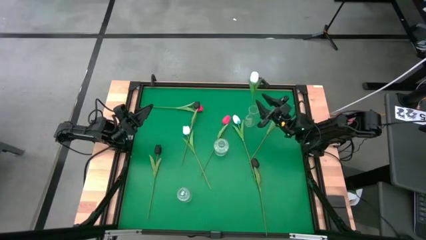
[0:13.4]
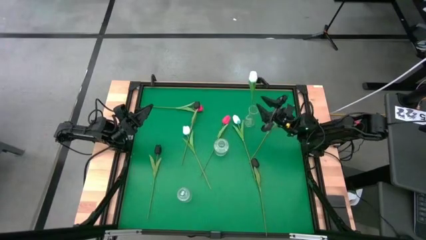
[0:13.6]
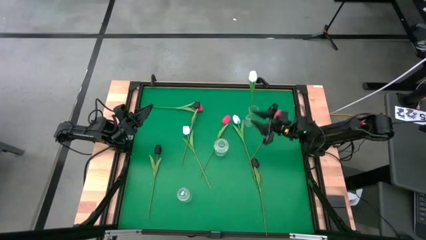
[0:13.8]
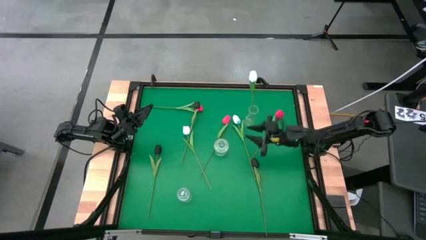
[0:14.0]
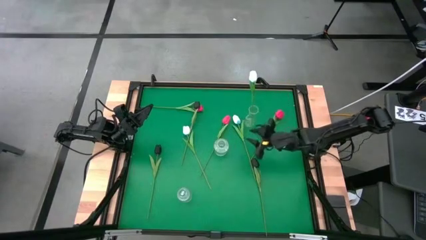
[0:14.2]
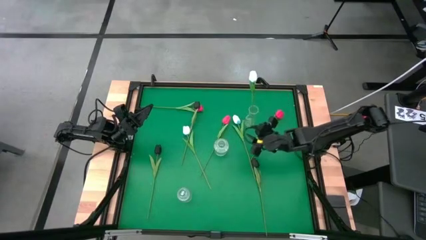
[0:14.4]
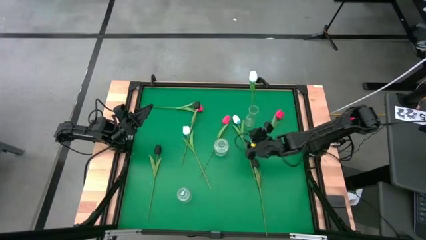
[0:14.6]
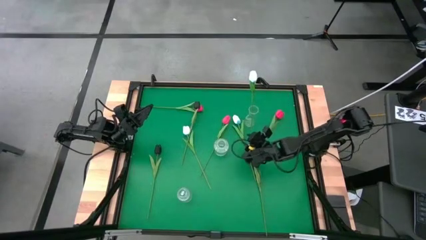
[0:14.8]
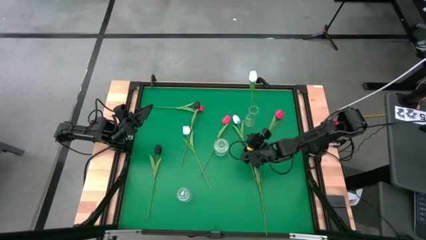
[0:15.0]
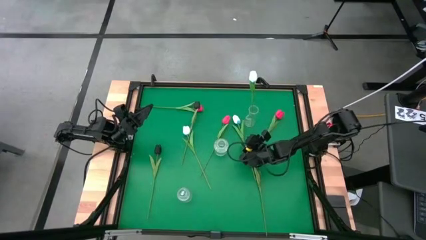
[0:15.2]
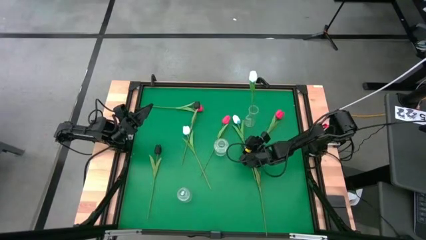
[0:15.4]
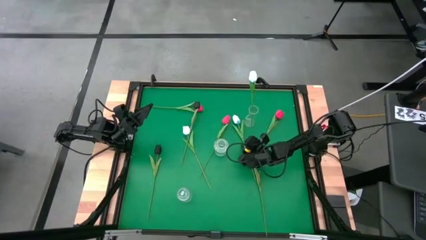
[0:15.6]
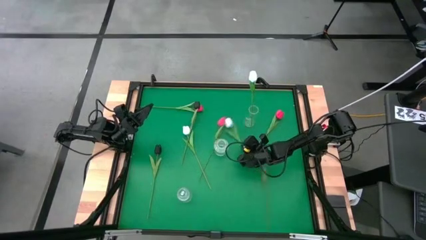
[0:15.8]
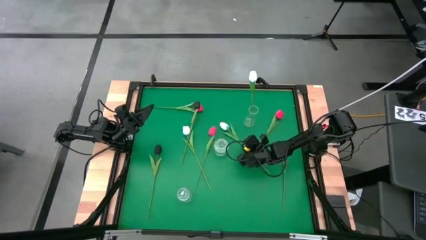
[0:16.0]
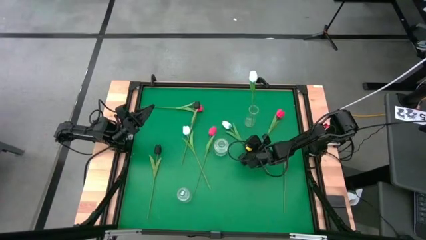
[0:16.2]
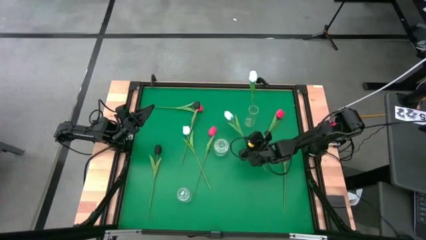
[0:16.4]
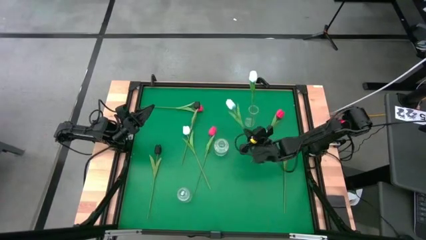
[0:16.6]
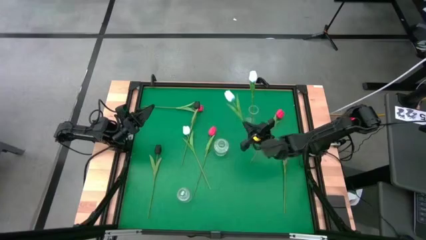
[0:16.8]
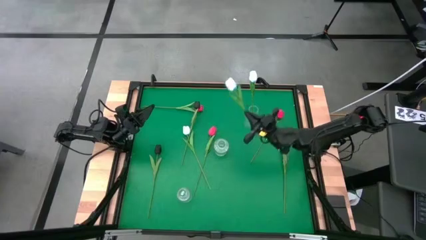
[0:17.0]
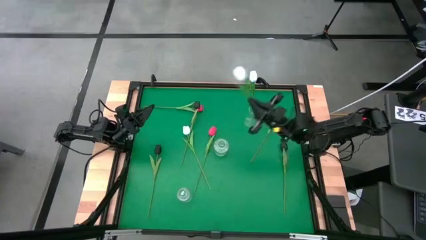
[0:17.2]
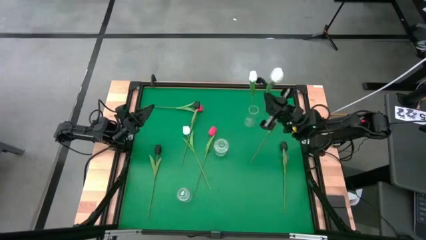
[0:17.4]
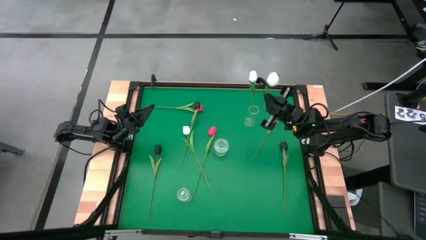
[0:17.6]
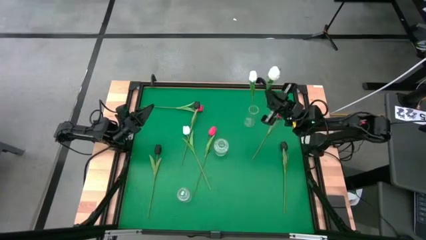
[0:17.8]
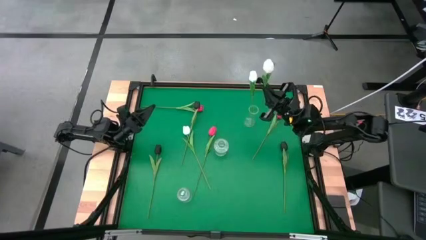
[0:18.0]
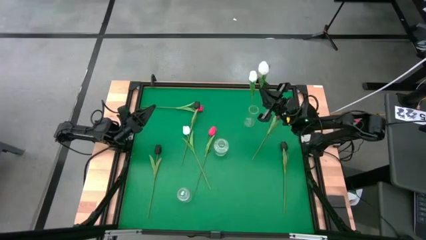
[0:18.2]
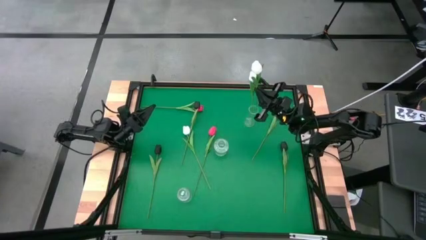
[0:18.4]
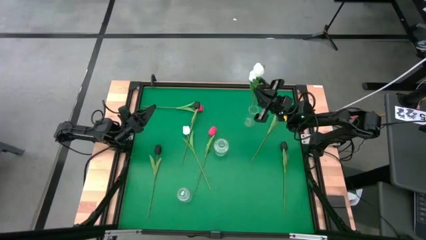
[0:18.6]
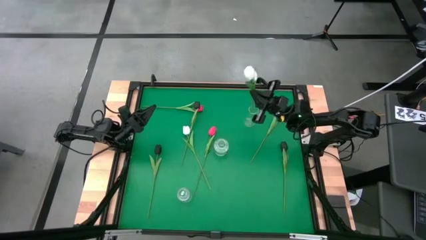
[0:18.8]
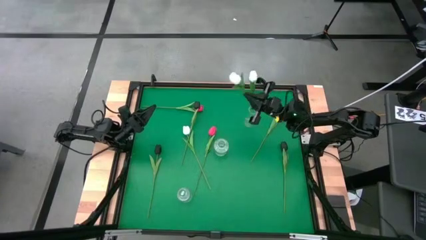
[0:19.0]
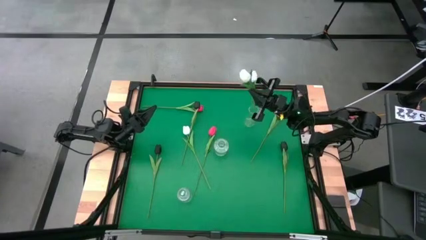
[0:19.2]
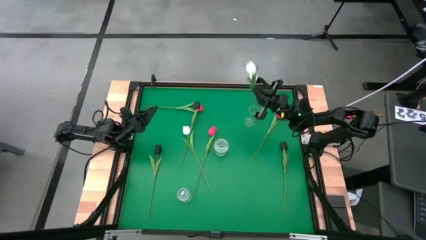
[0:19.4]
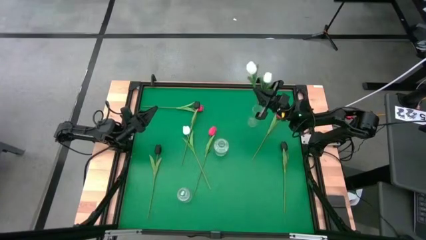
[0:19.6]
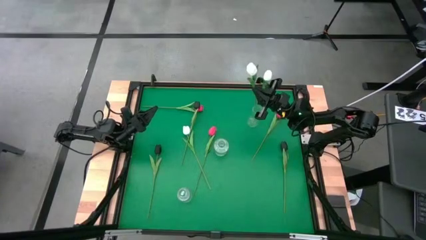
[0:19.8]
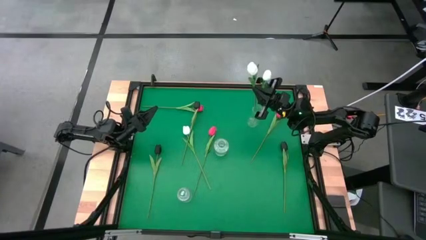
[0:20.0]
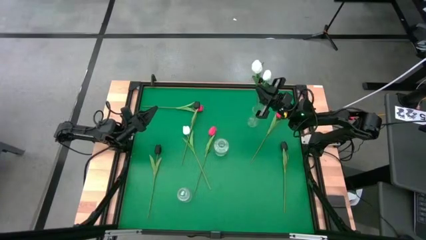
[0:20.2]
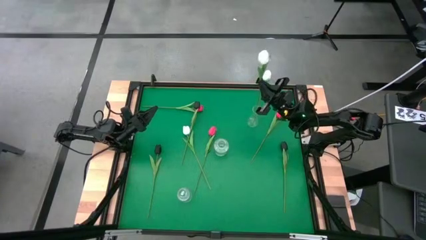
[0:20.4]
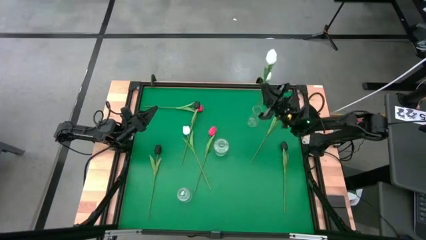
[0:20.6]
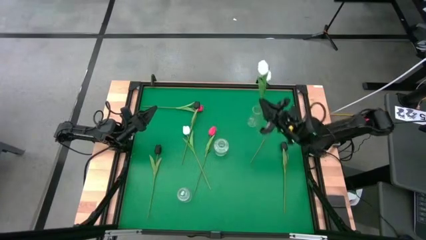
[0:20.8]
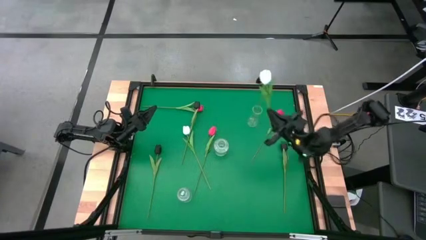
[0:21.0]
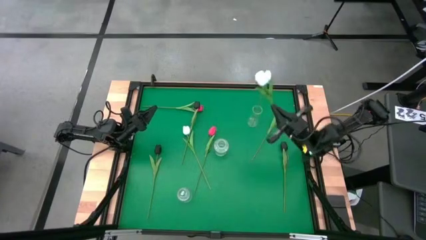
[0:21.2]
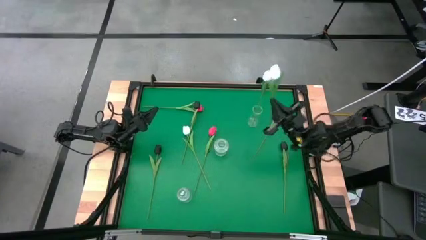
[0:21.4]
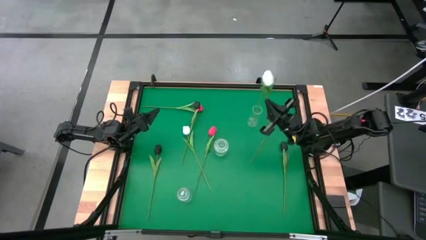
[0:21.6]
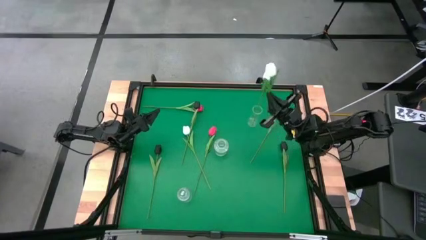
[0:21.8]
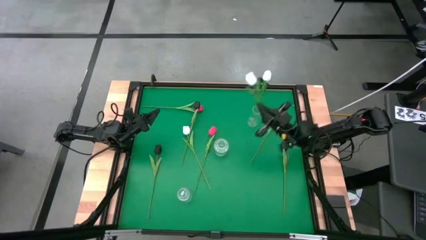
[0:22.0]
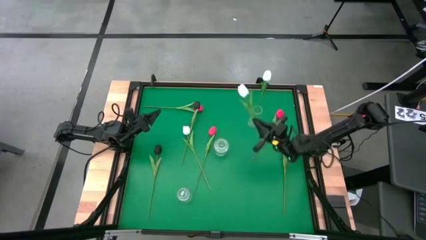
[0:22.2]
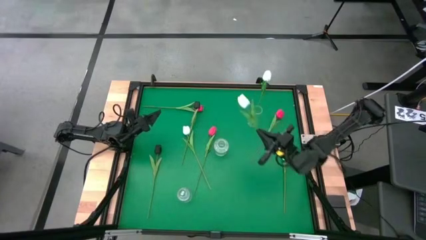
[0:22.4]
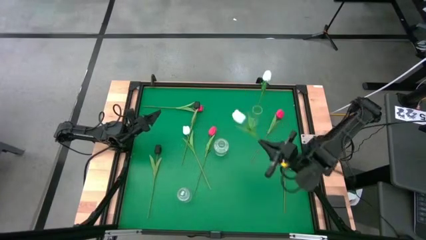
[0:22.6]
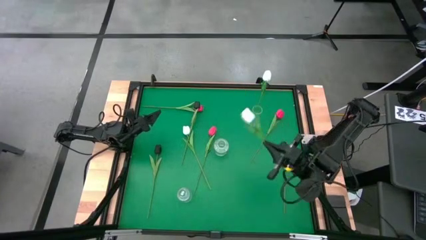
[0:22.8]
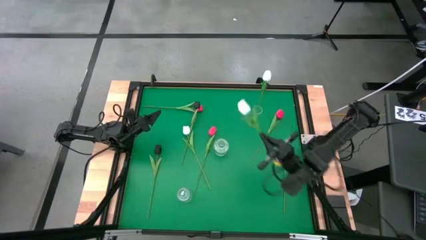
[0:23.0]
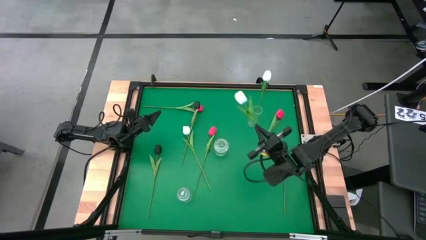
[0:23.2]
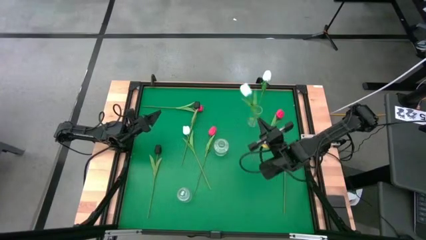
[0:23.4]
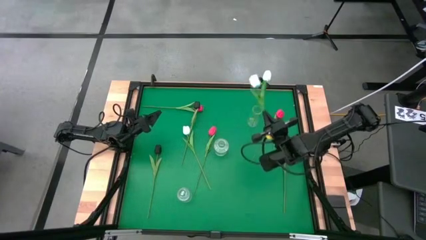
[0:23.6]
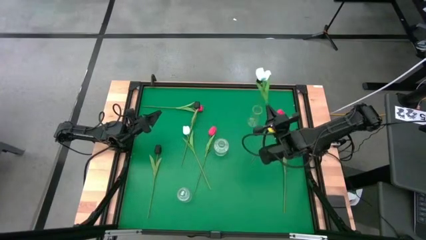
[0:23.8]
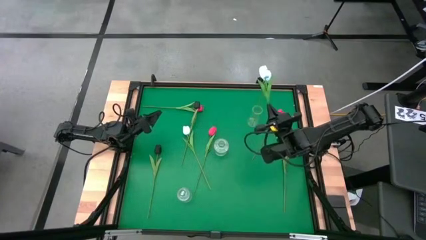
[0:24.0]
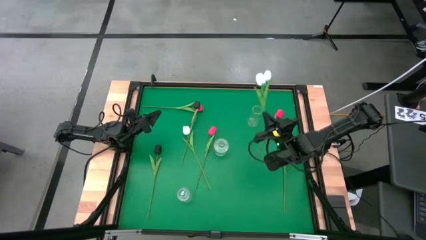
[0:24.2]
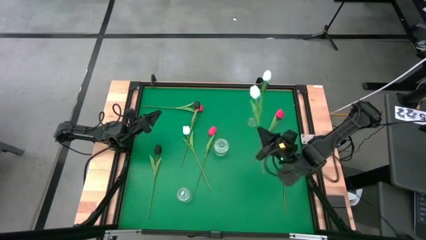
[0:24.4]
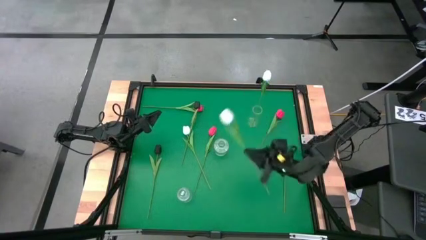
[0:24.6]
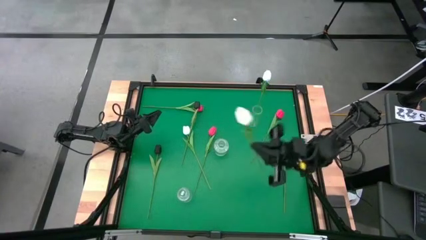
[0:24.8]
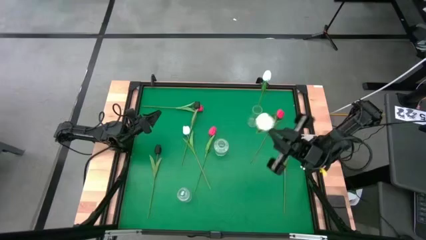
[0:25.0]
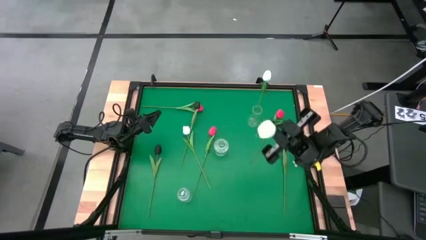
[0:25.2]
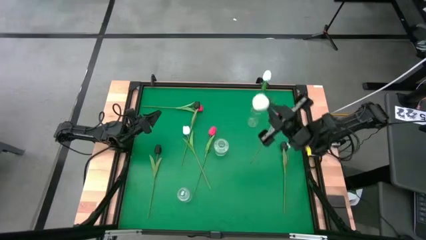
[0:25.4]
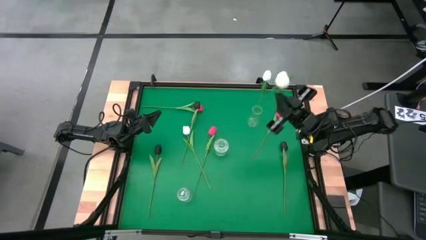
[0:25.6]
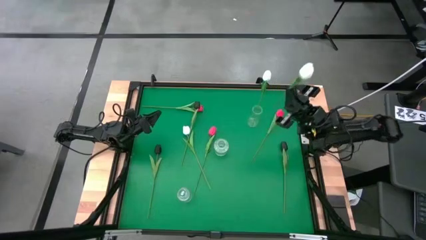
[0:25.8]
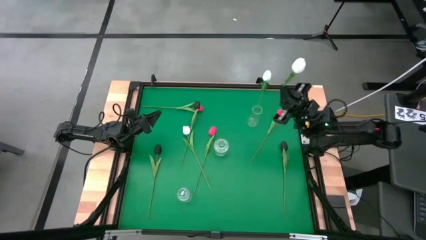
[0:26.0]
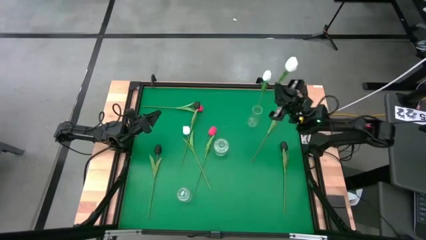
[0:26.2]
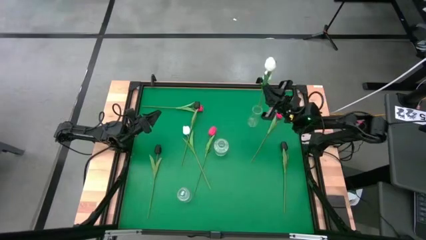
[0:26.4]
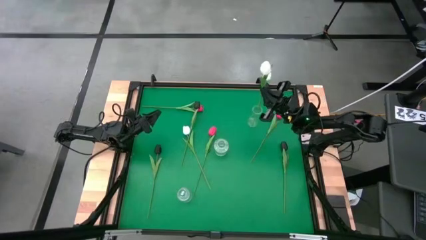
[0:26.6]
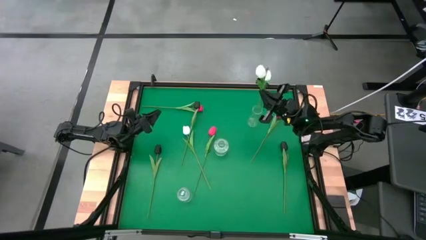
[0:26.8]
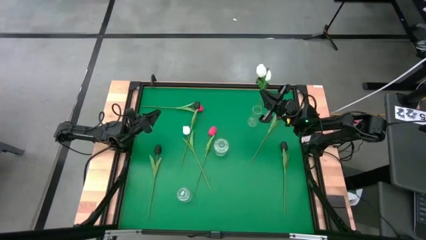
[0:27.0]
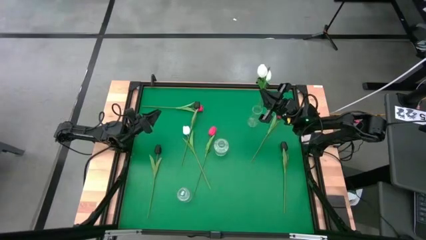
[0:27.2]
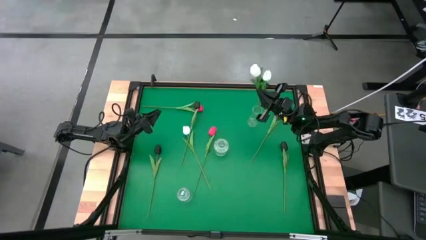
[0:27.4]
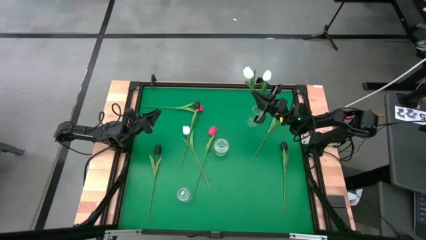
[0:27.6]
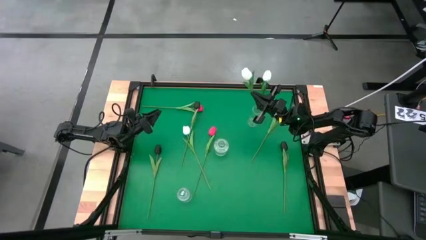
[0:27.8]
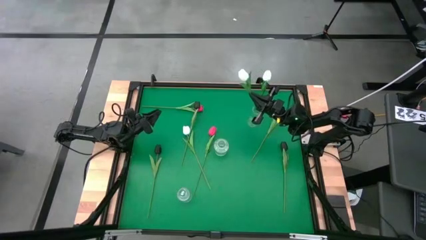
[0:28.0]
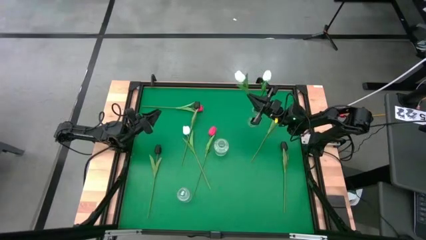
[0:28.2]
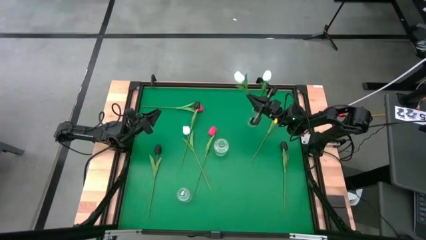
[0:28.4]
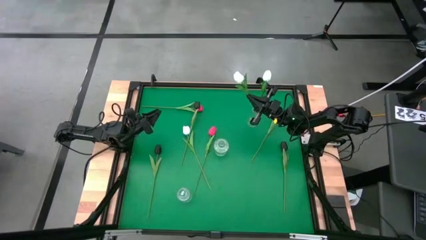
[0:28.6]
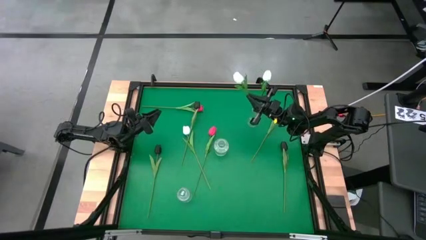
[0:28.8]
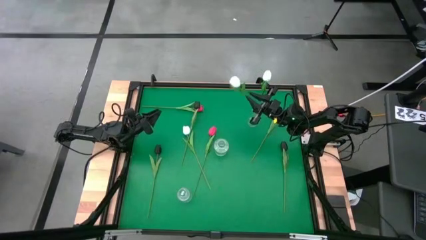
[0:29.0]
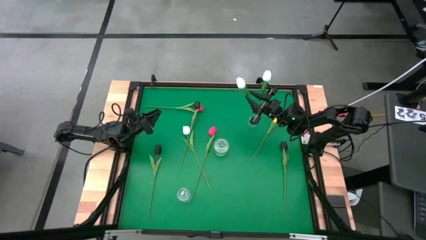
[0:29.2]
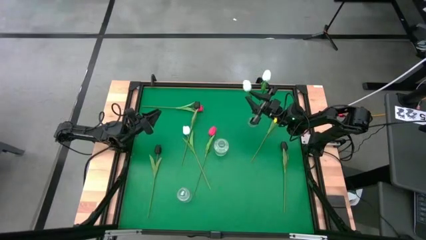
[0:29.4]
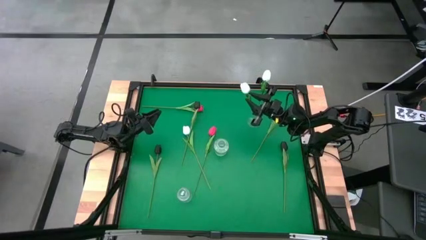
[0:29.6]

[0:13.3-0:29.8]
Task: Sort flowers into vase by color
Put the right white tulip into the top transparent flower vase
